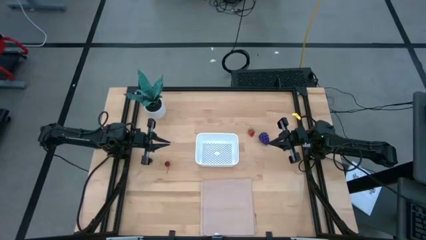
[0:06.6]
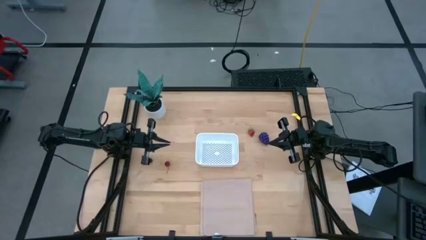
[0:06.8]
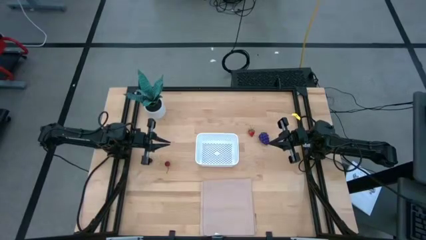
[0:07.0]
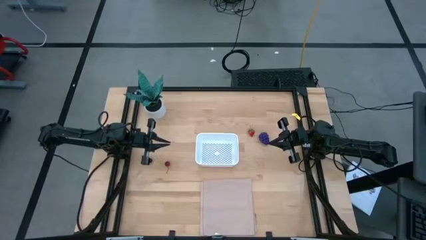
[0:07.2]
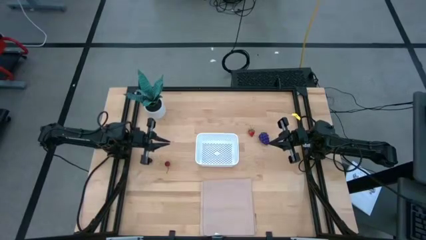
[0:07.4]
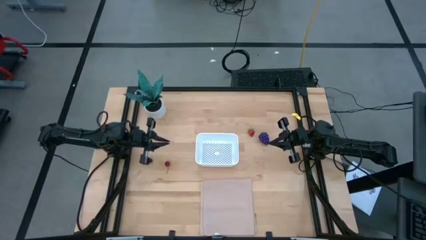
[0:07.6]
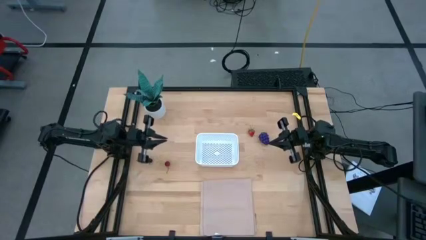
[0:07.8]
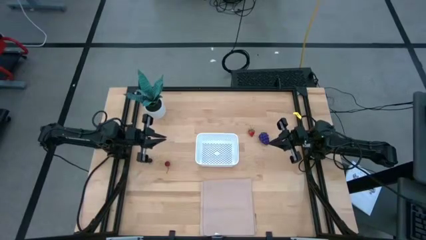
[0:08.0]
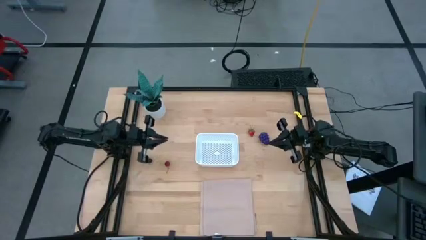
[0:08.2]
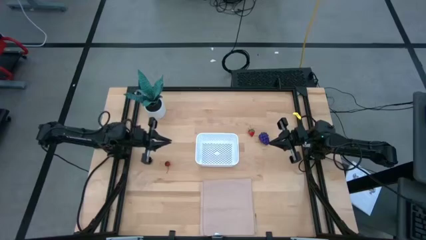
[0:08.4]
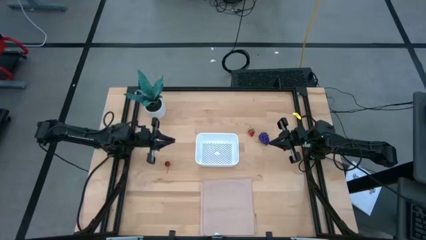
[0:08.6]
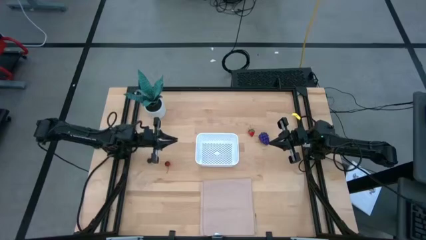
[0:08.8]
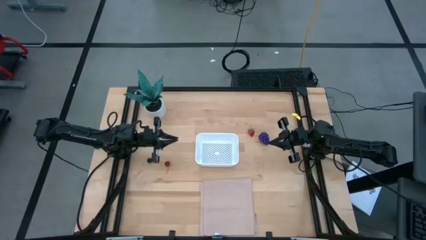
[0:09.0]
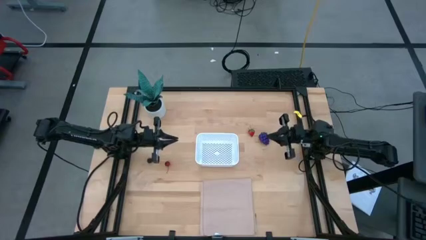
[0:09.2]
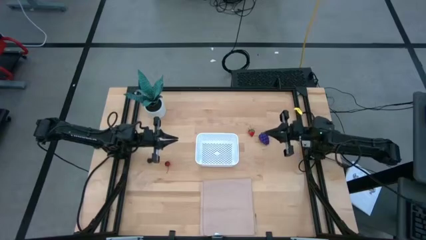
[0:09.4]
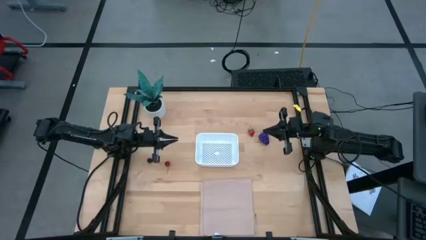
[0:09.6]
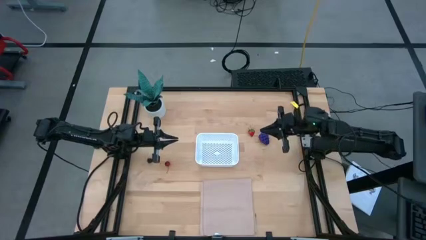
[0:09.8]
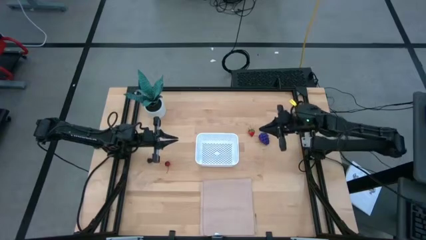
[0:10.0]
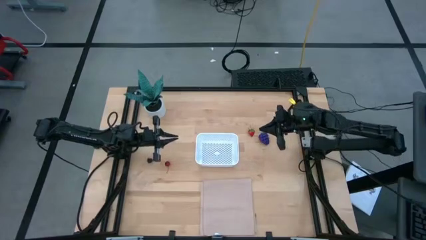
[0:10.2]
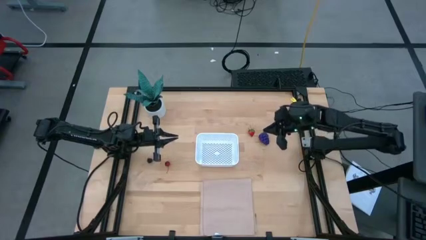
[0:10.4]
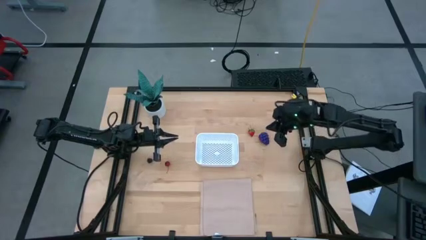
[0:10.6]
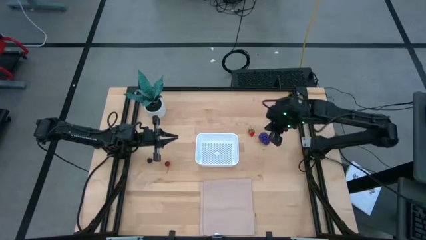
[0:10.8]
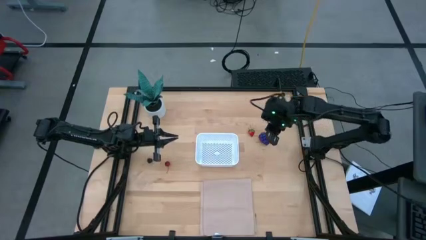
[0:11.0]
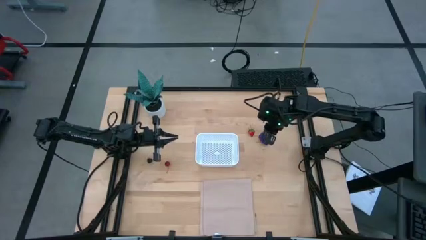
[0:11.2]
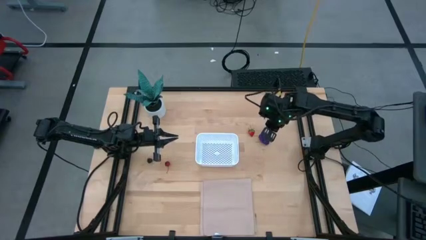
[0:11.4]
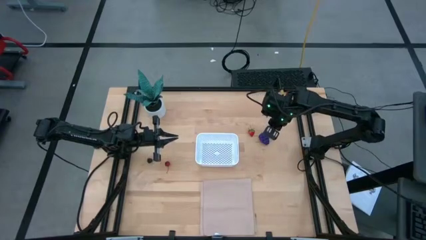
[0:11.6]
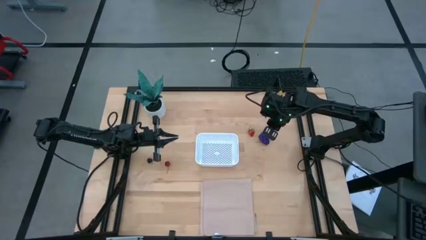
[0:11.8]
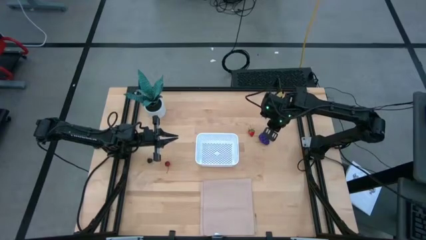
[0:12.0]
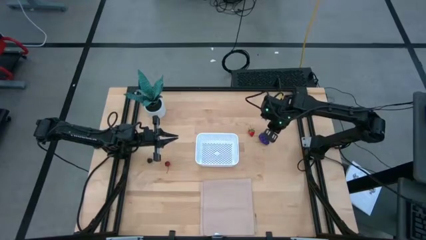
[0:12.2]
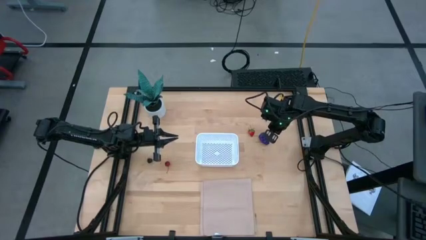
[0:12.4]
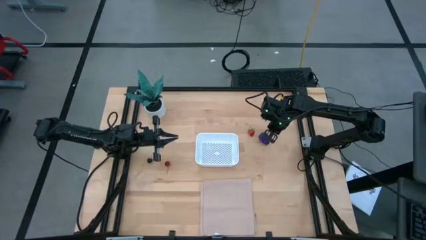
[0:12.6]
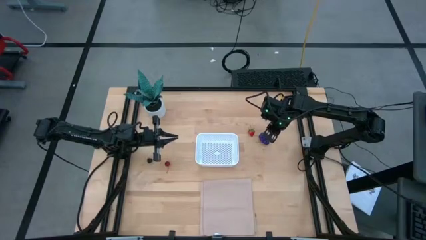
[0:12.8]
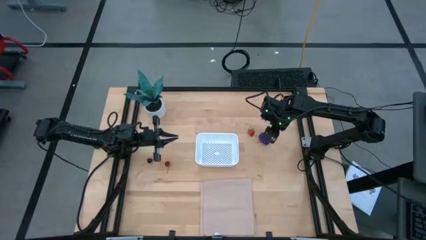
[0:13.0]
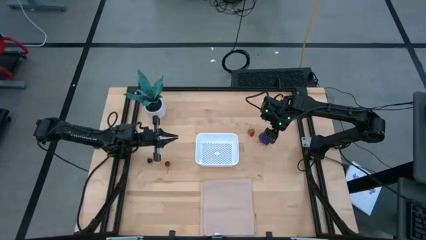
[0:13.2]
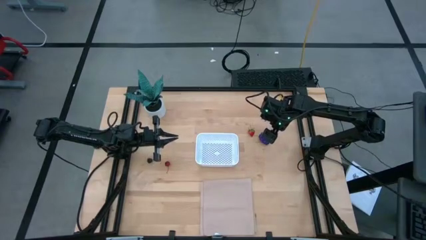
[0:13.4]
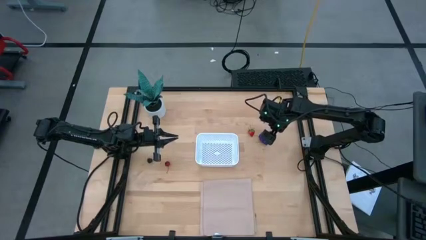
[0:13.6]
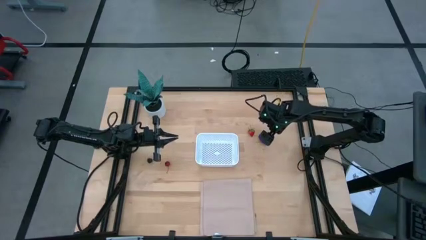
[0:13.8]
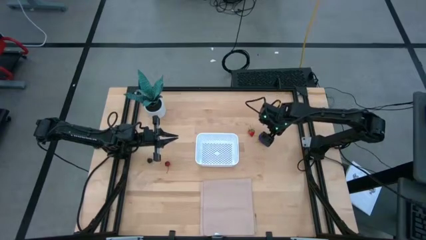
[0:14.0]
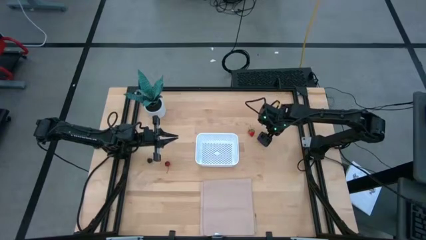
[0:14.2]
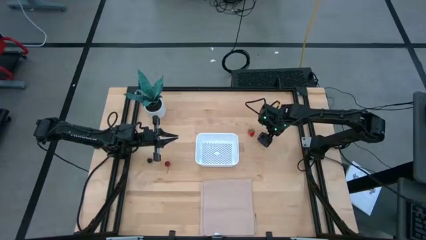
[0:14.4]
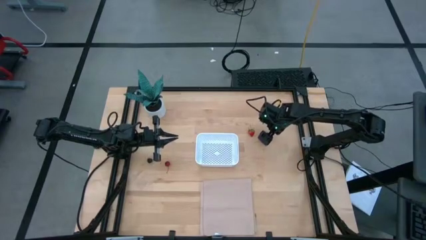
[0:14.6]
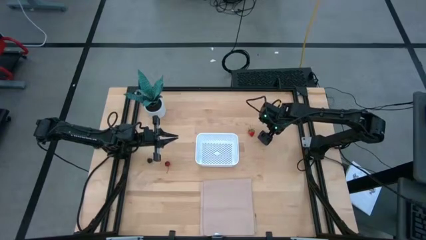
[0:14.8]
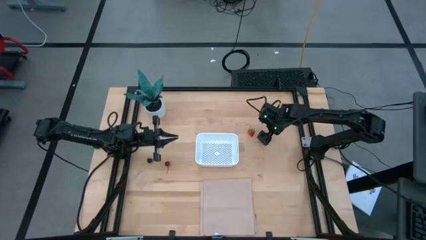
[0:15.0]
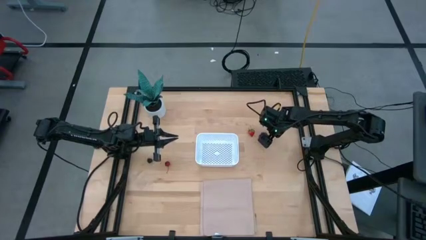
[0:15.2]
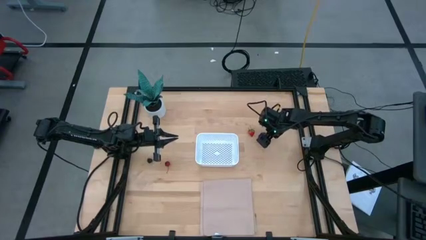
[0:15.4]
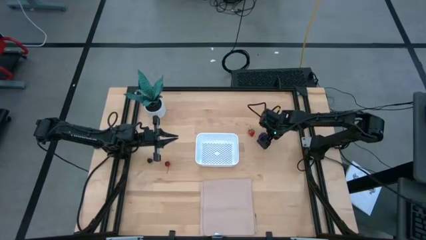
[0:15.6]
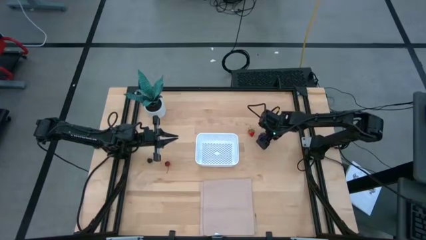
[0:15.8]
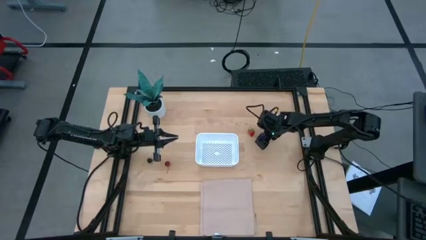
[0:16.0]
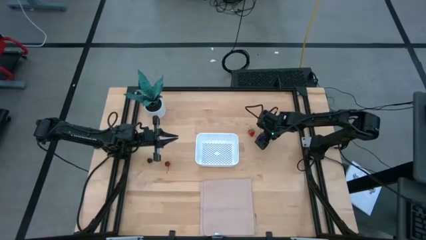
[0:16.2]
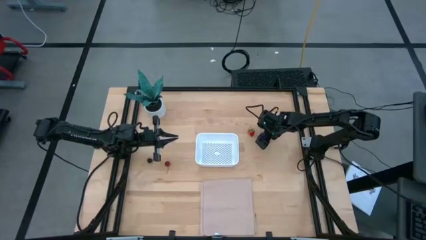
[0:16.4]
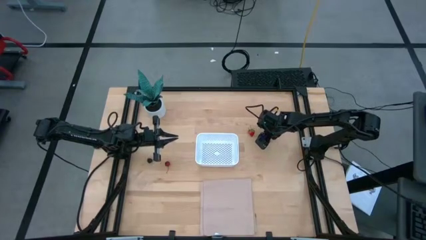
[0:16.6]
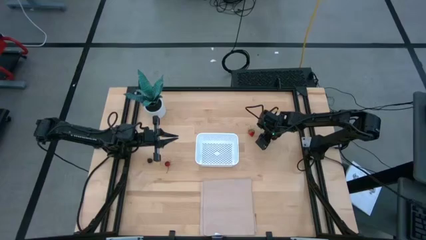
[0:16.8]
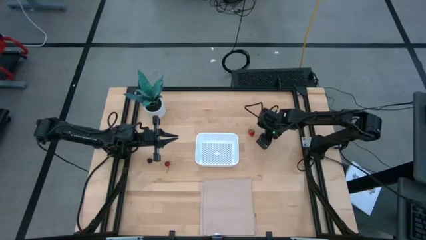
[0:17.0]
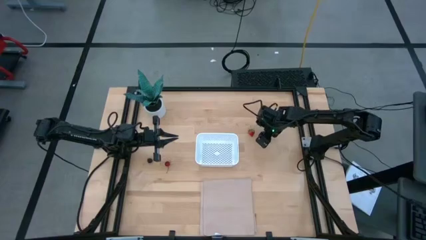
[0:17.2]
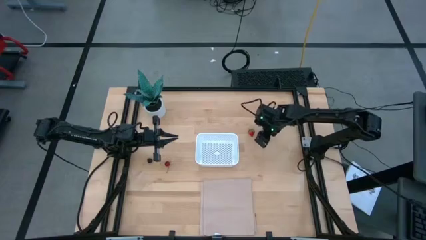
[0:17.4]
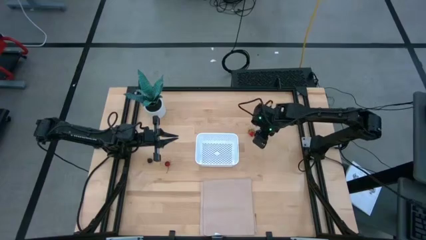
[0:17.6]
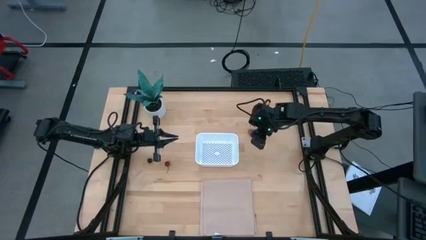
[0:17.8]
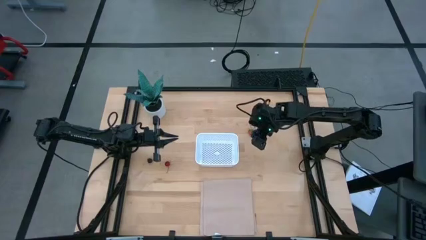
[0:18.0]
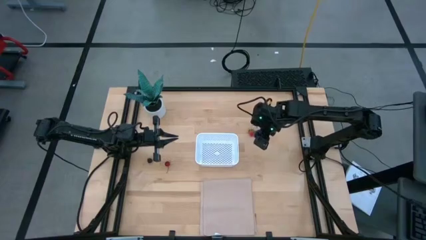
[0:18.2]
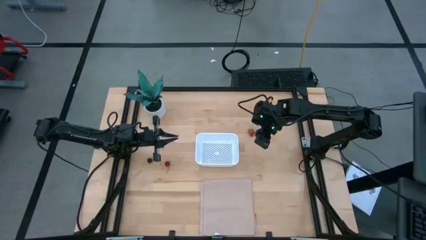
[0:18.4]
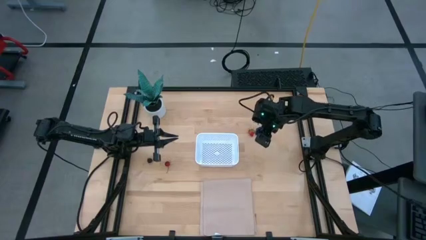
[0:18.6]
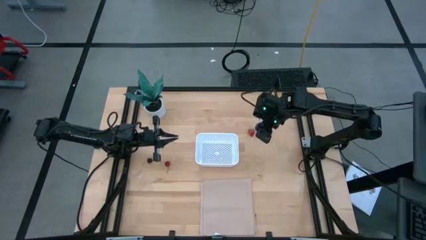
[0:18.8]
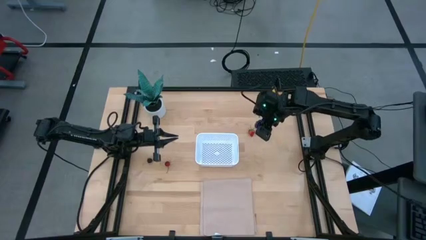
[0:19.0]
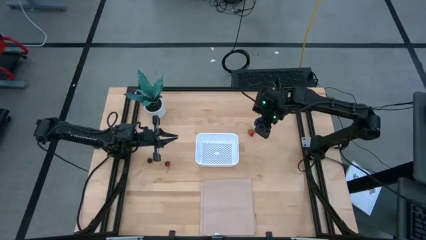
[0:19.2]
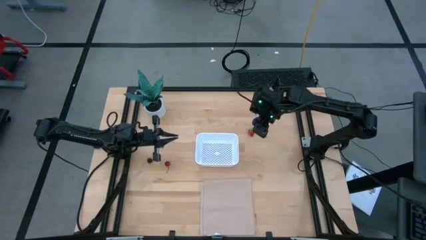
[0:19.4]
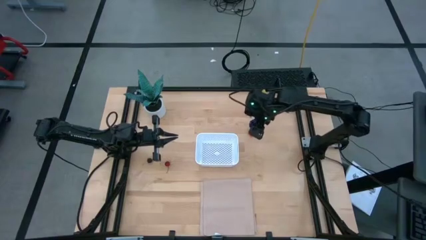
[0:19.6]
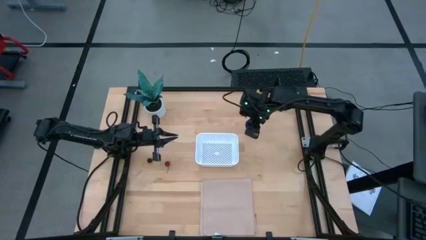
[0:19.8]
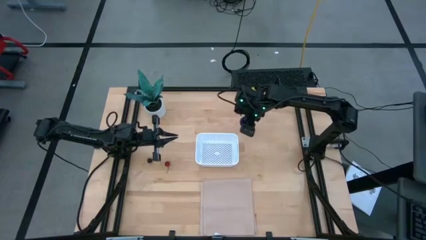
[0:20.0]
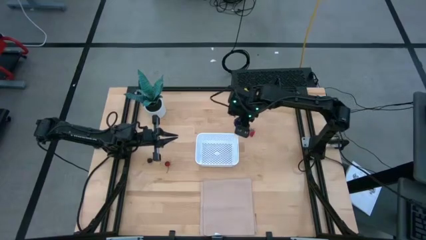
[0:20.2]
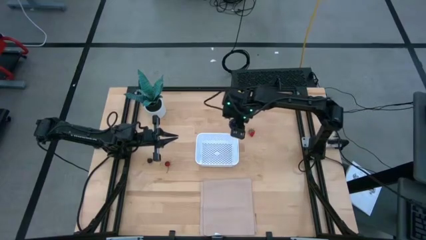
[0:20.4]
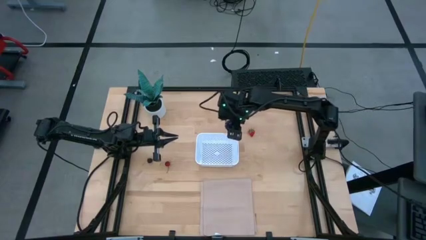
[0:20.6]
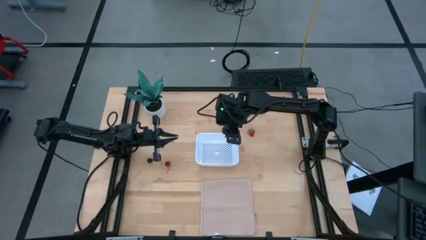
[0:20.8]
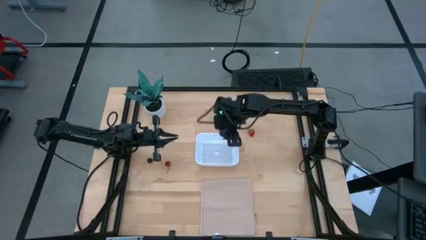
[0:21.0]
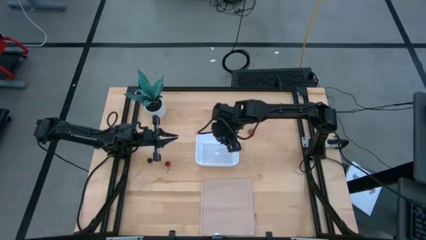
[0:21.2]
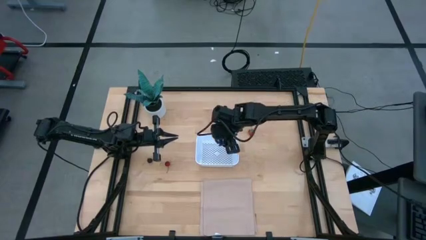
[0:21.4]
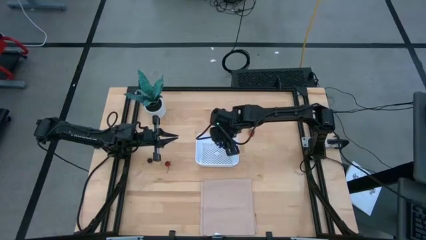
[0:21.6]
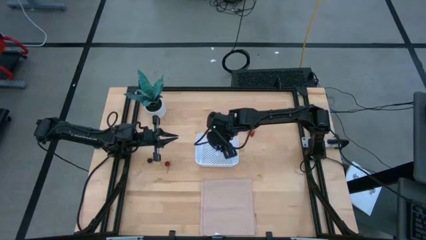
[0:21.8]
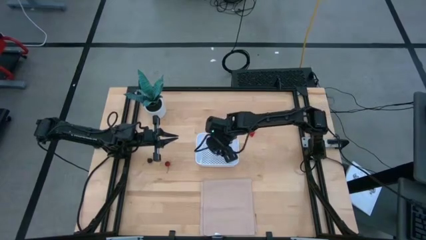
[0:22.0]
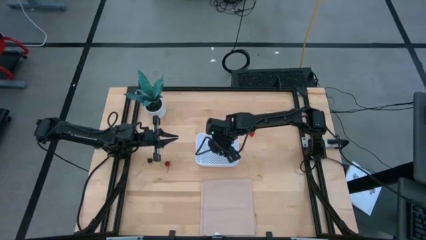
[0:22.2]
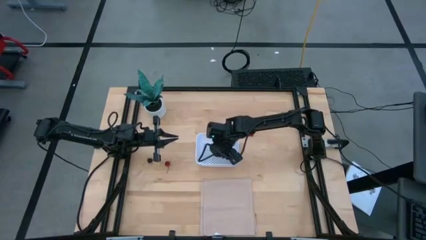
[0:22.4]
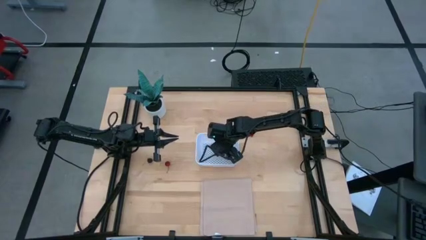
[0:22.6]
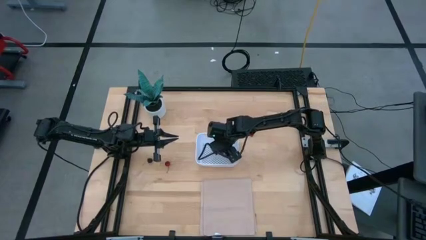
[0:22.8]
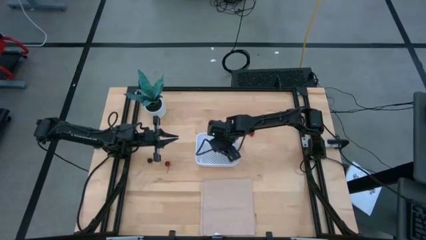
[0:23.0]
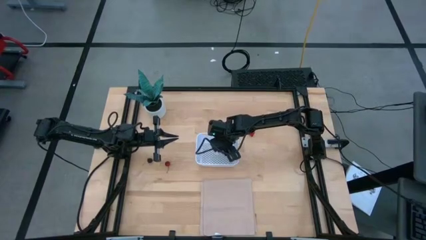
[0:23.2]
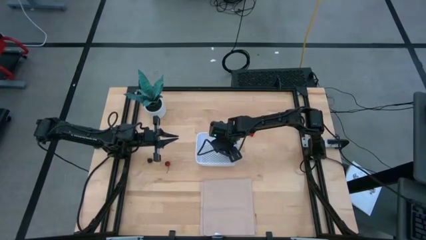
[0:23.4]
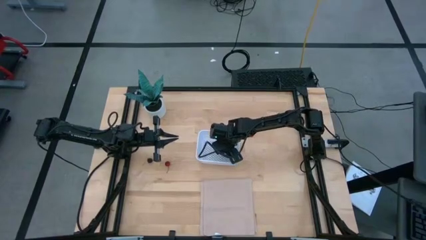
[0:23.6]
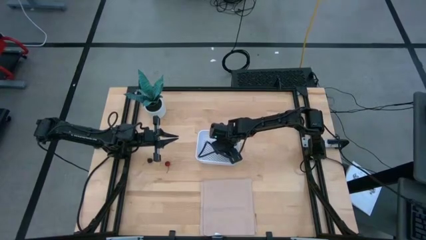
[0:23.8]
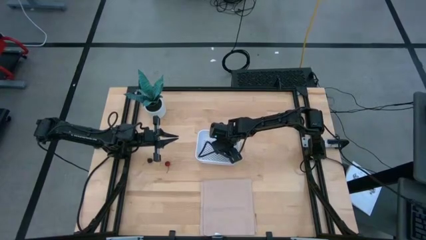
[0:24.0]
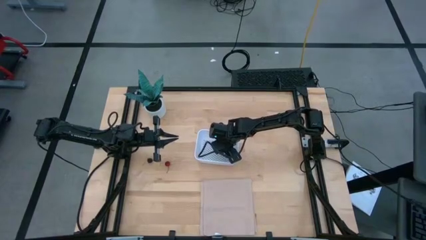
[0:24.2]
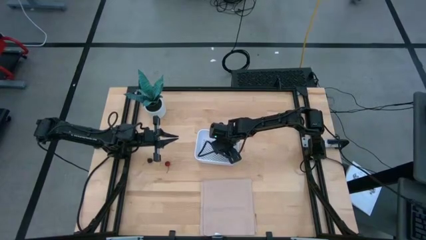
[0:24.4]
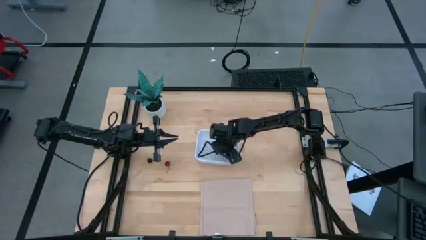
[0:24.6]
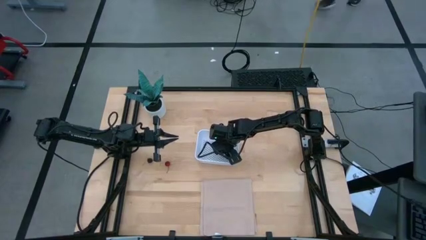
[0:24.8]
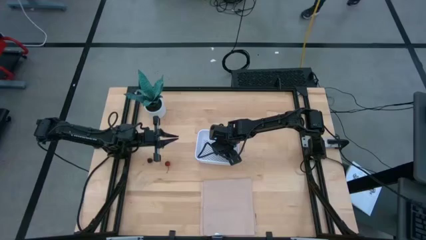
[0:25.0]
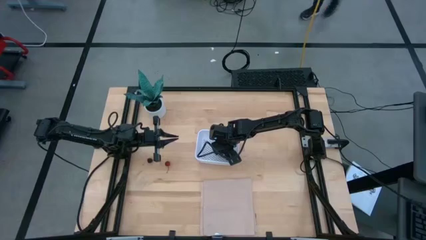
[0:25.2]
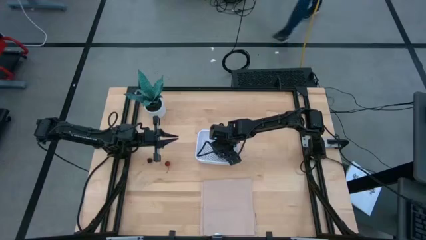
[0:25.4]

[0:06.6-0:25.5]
Task: Pick and placing Produce into tupperware
Put the purple grapes into the white bin
